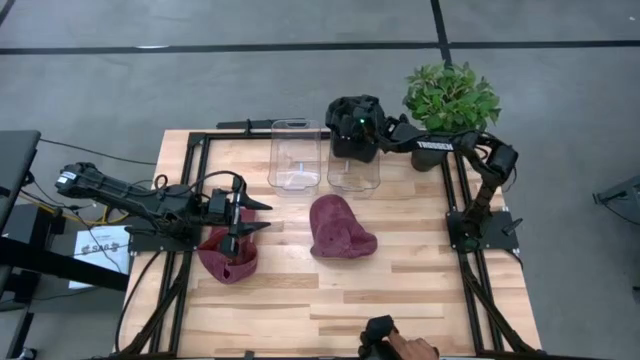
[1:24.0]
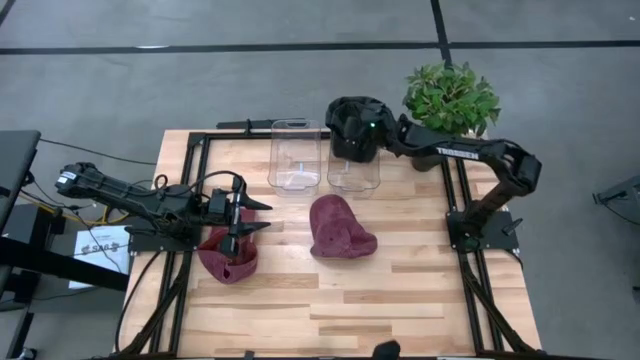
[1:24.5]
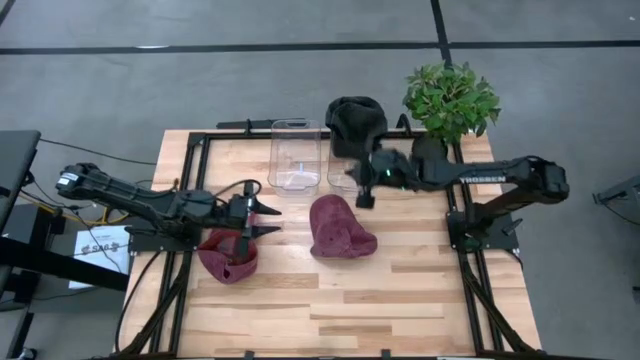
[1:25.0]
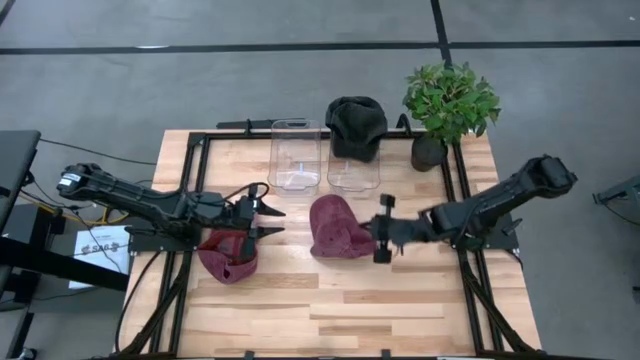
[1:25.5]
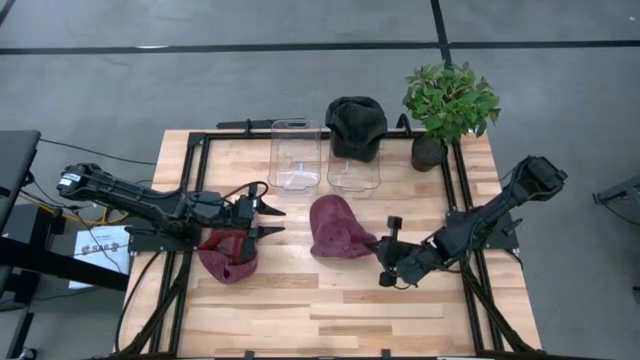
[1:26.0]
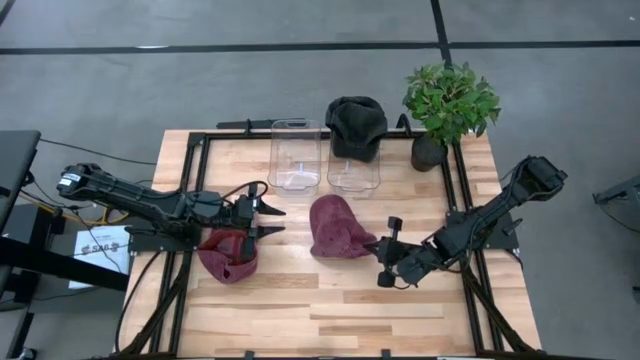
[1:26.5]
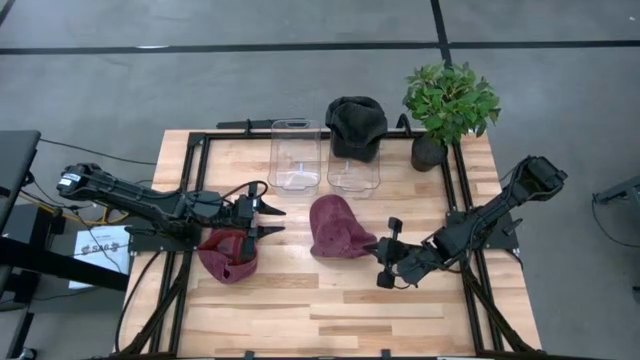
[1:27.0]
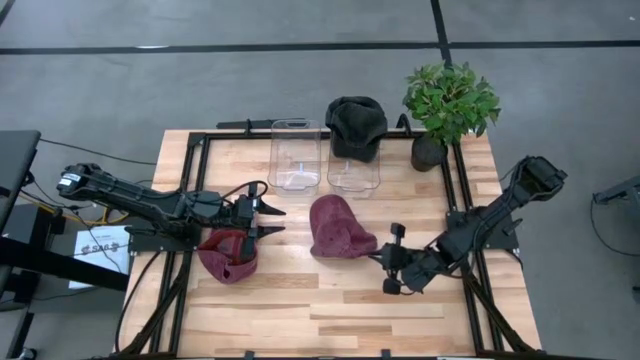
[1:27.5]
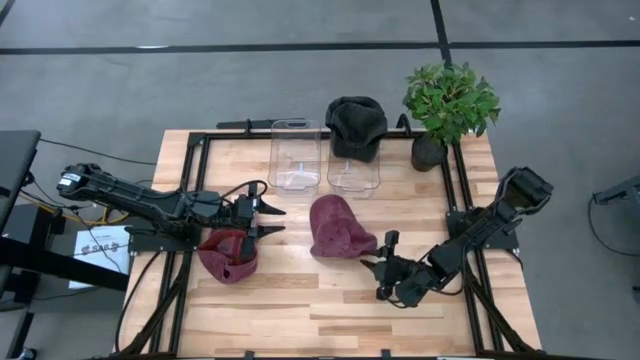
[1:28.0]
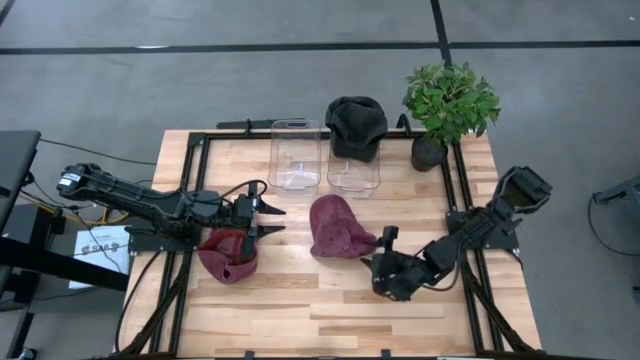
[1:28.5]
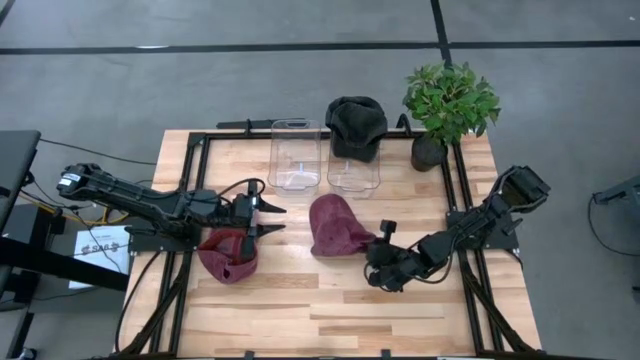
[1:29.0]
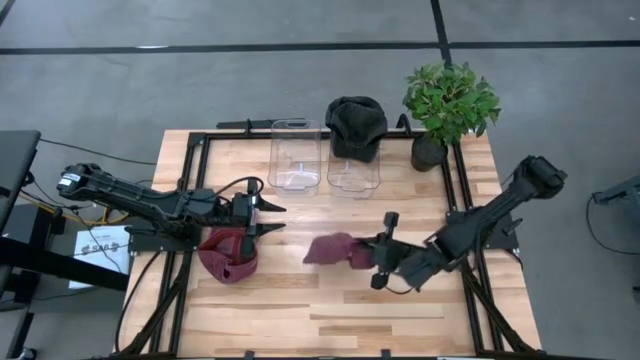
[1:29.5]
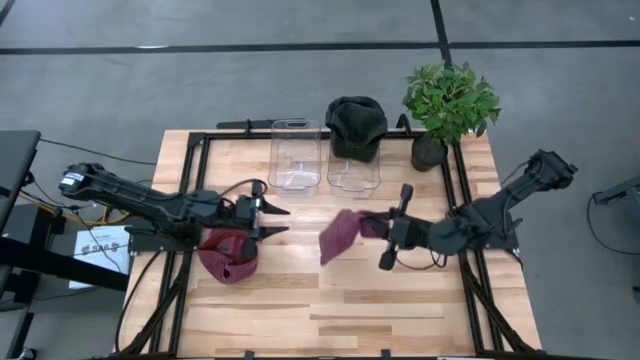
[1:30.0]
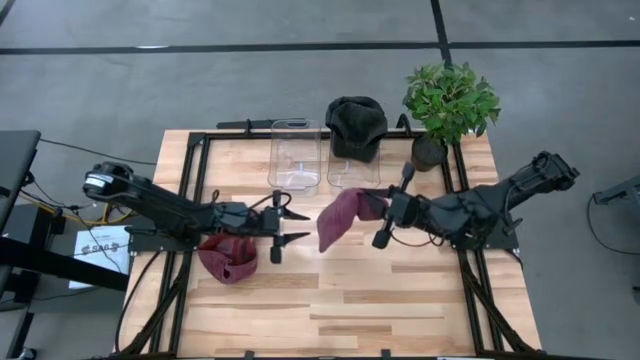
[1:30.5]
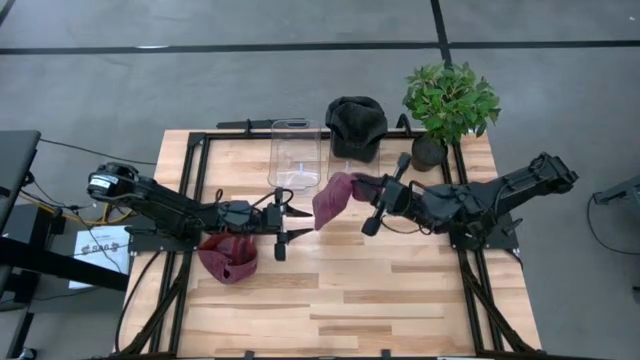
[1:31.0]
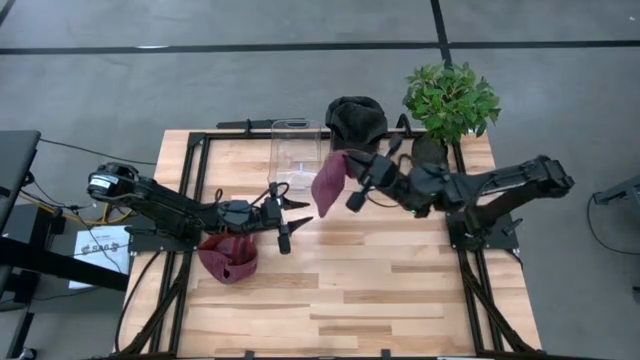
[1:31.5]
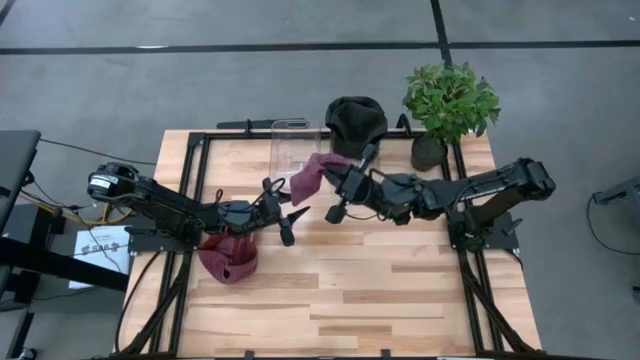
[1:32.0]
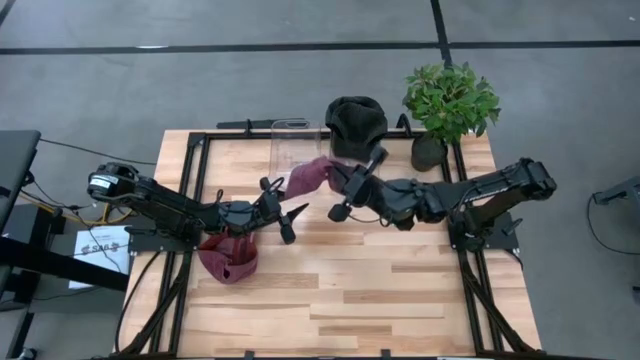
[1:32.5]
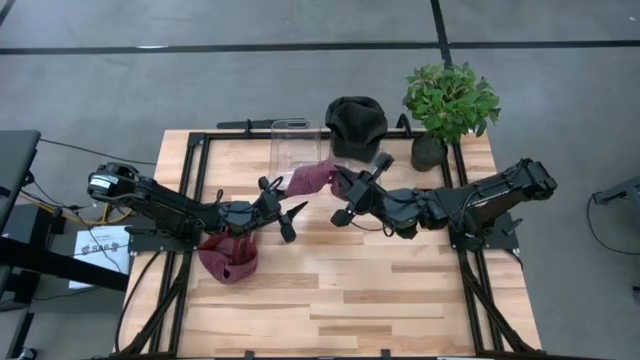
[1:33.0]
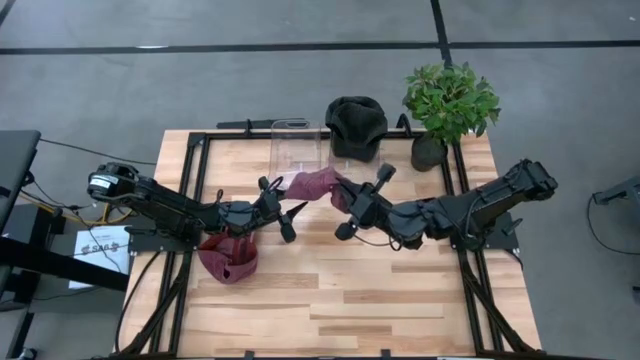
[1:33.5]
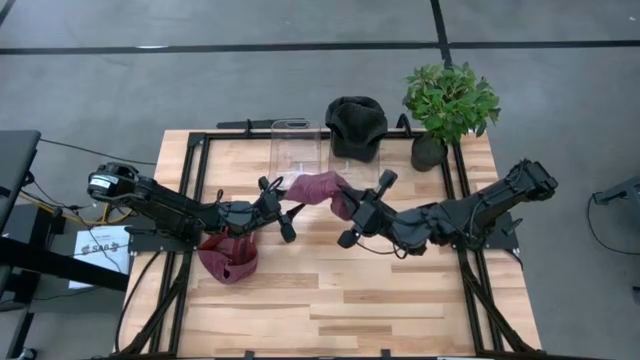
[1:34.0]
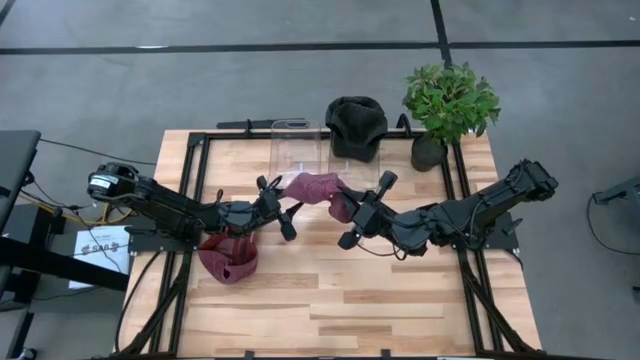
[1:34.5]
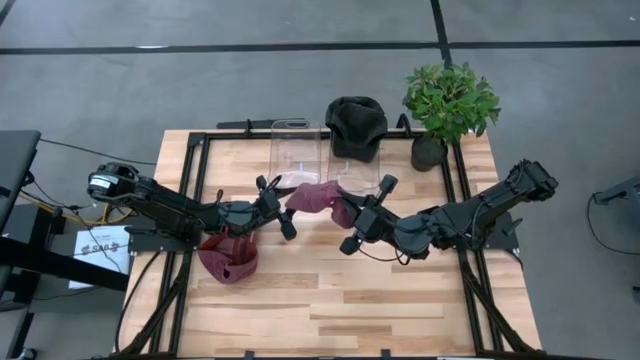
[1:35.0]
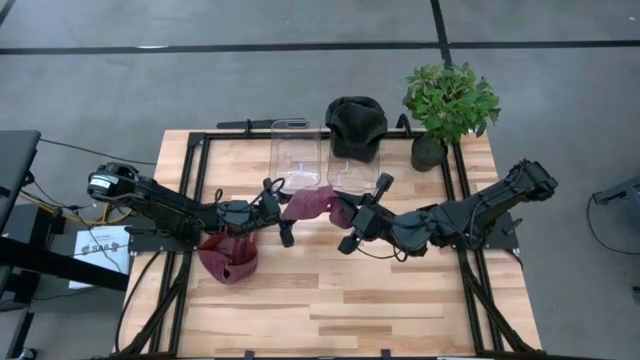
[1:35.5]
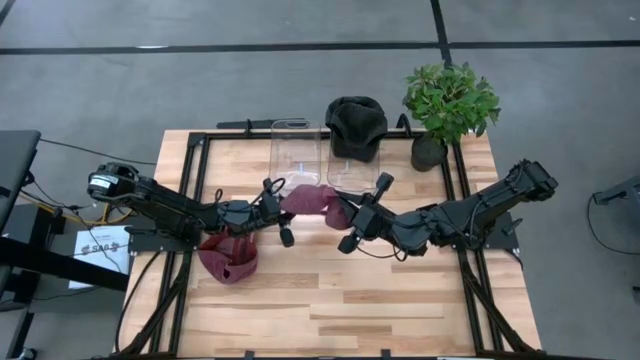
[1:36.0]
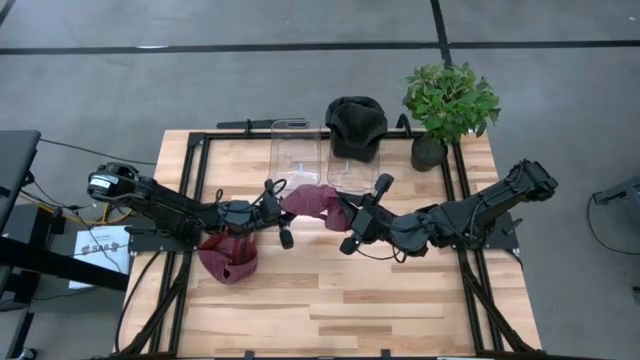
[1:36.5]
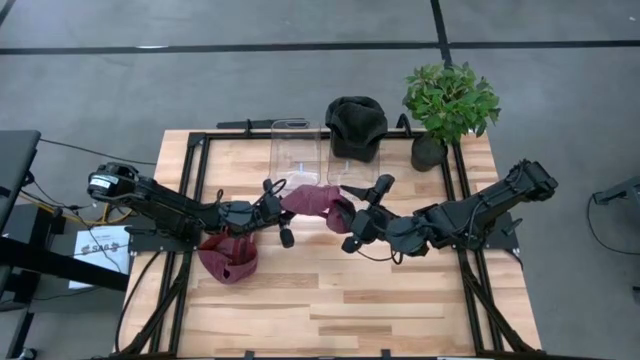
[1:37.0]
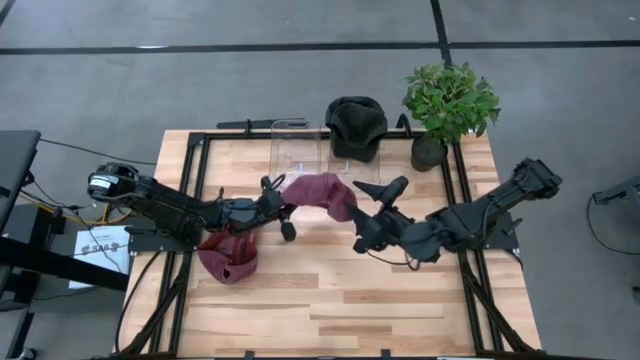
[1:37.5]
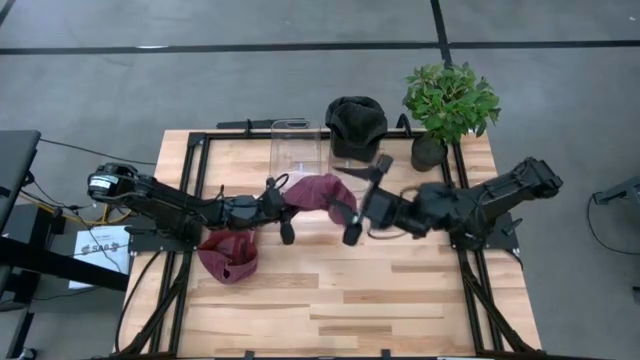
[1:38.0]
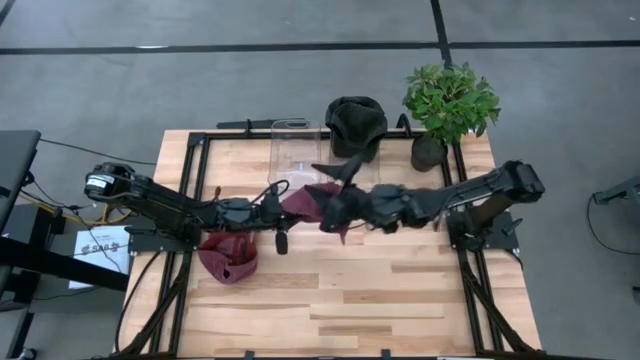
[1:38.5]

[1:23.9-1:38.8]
Task: Pick & Place hat
Put the right red cap into the left transparent bin
